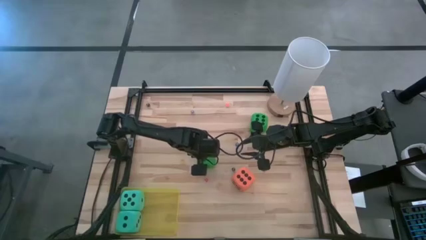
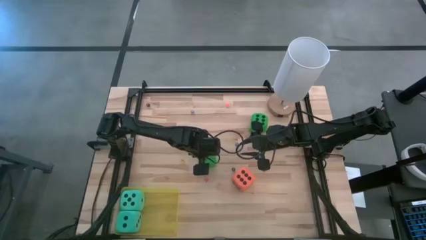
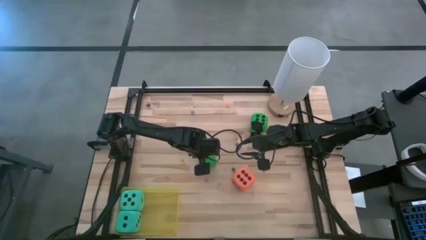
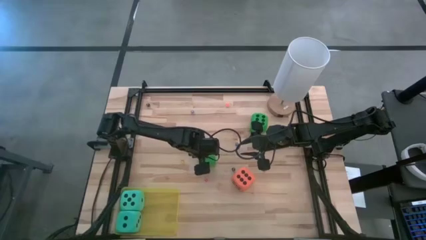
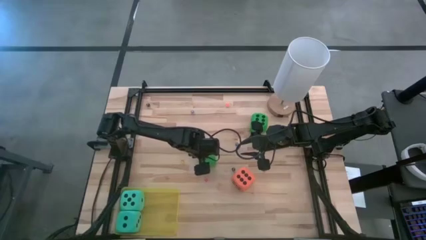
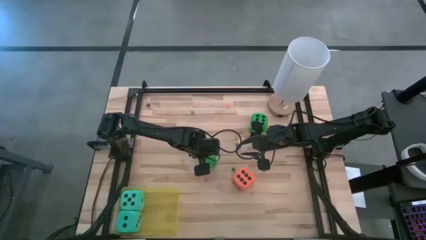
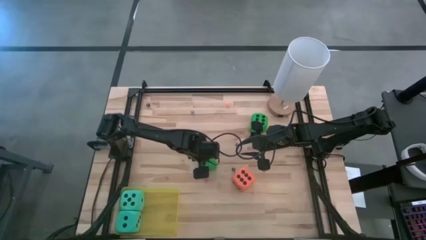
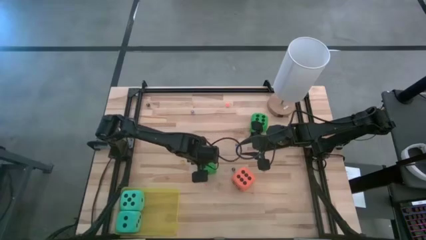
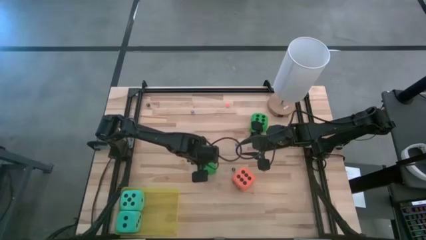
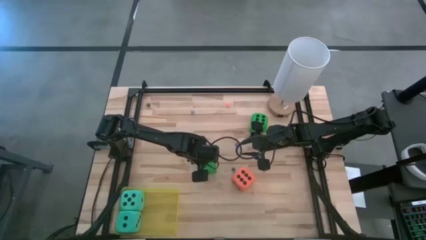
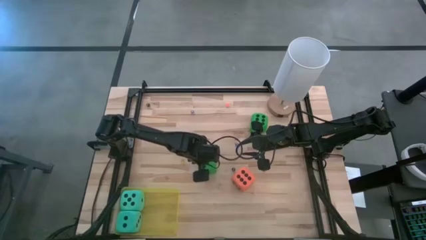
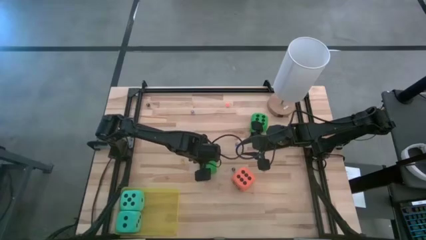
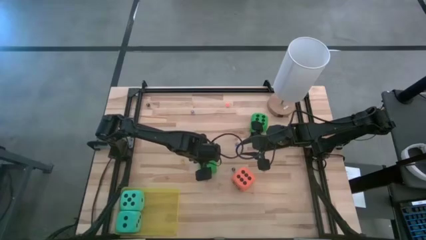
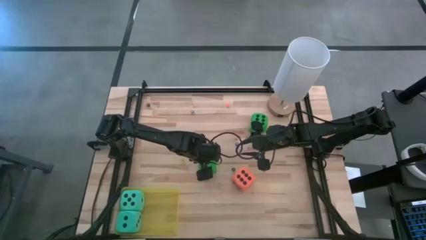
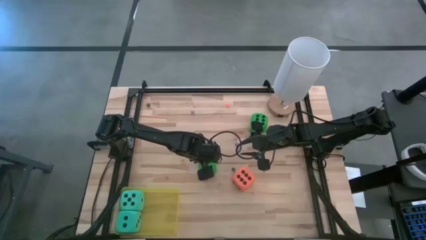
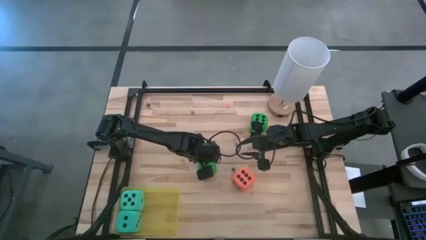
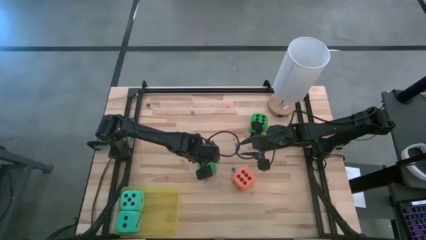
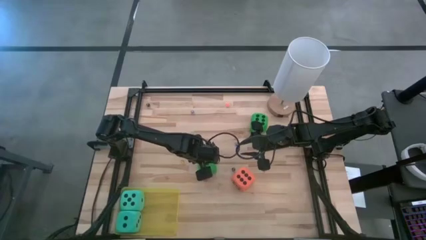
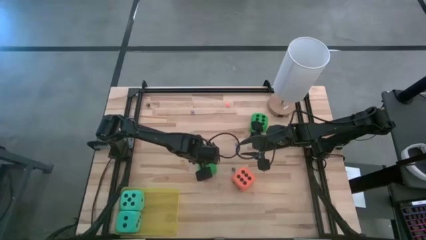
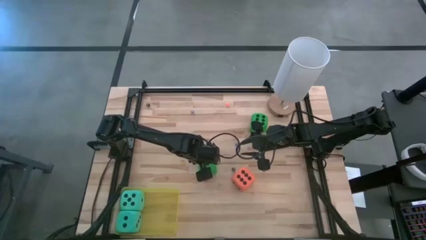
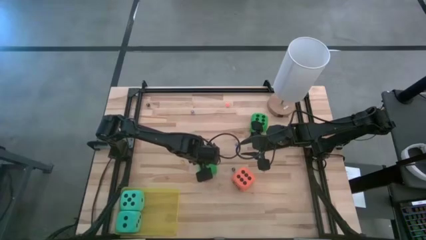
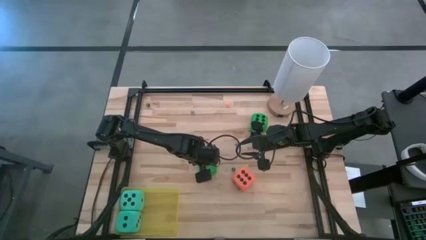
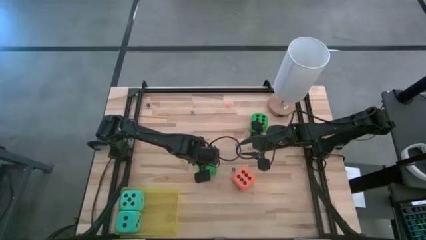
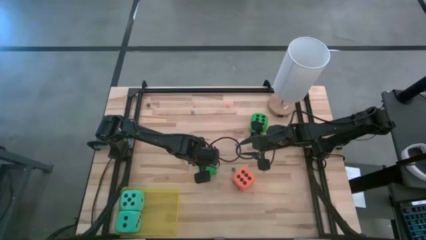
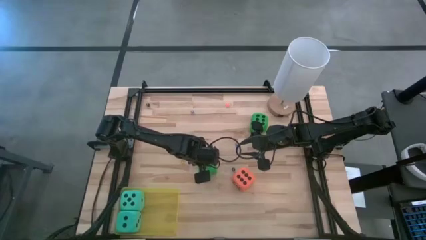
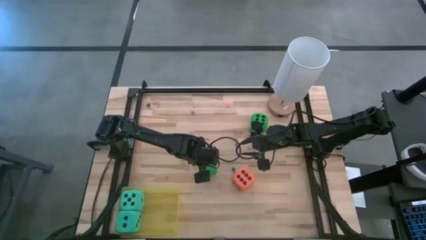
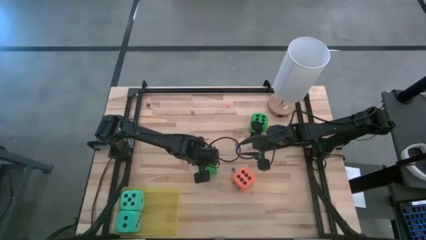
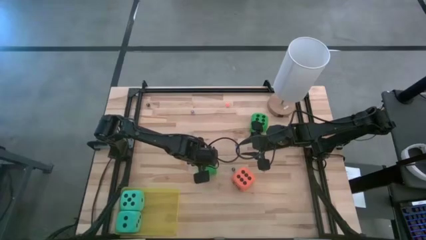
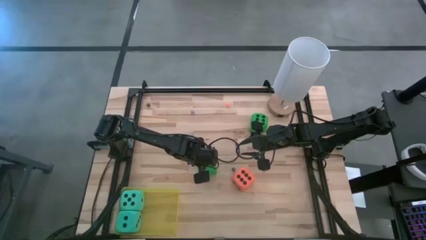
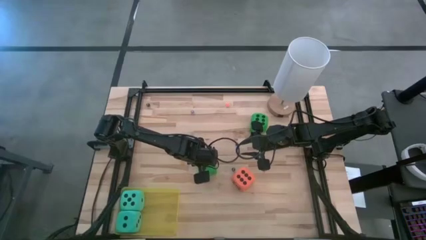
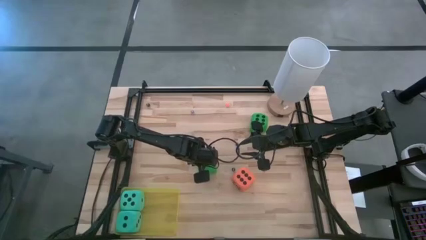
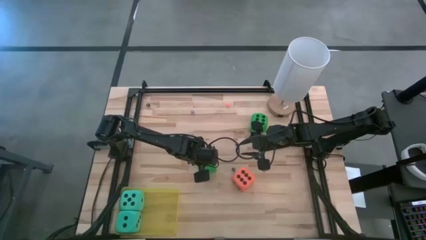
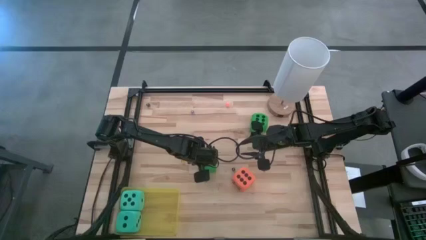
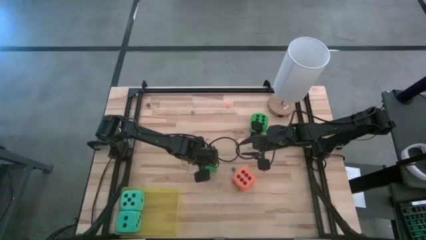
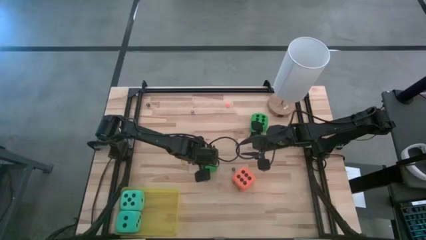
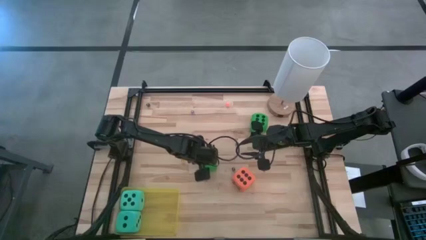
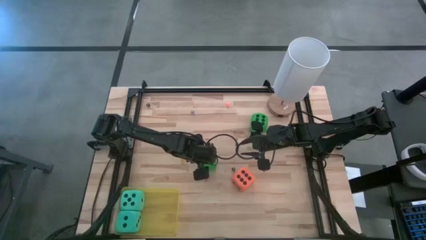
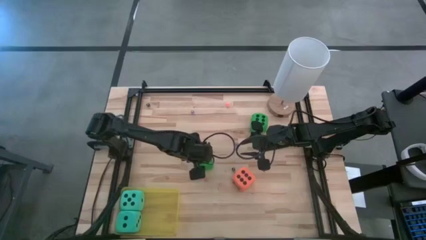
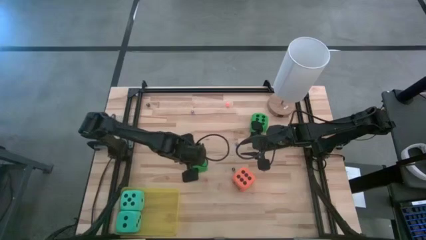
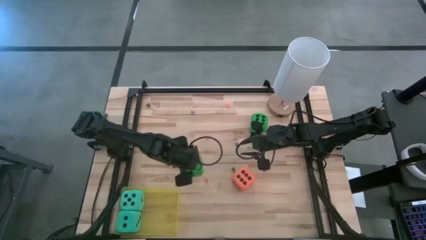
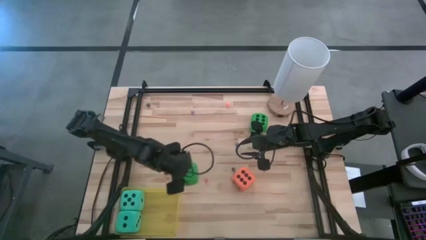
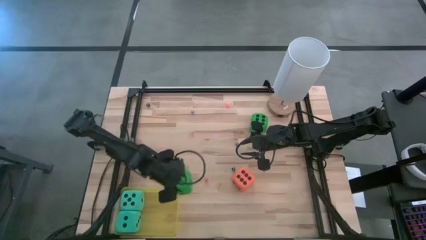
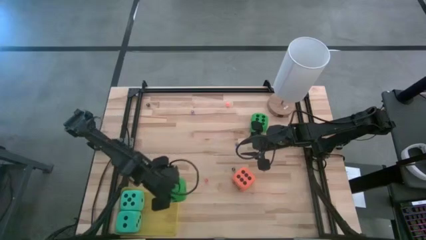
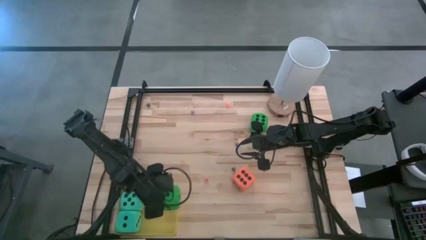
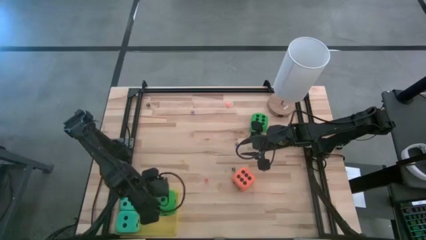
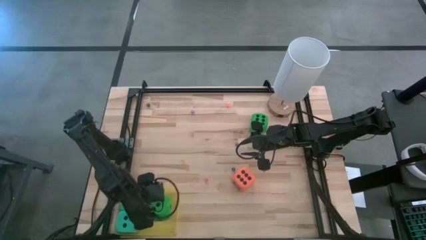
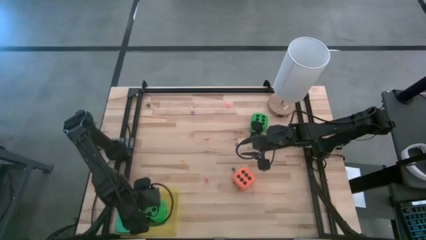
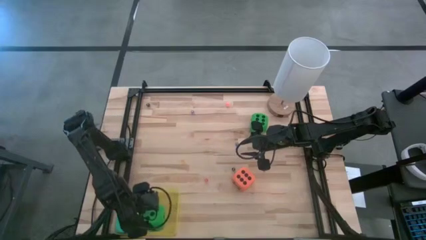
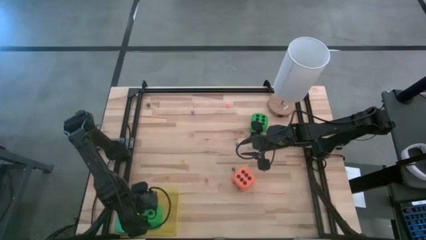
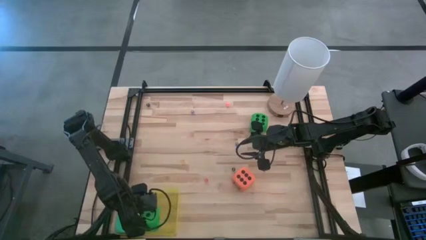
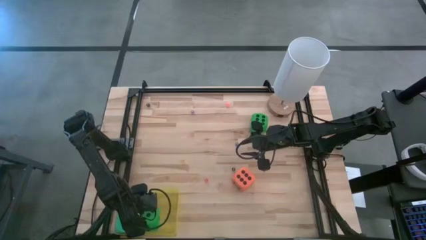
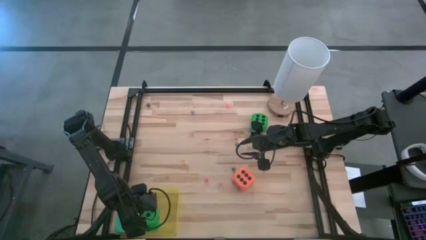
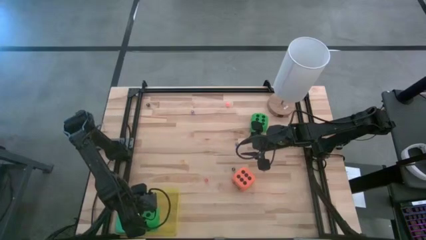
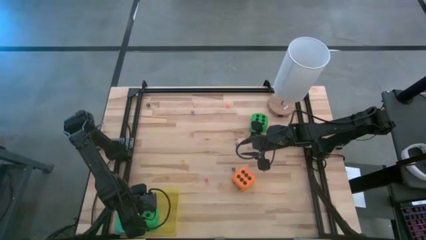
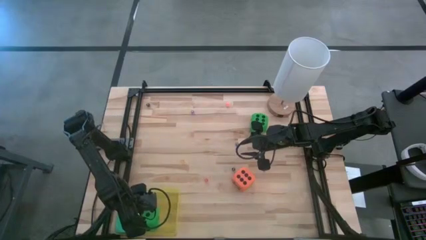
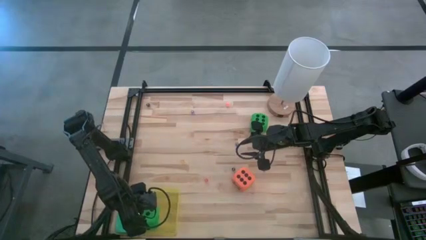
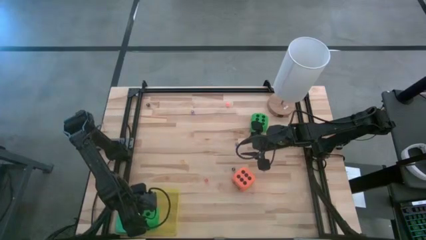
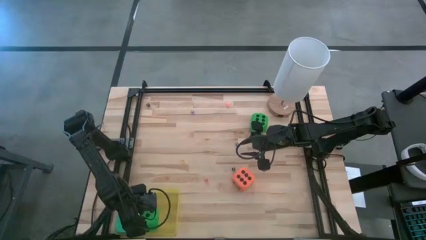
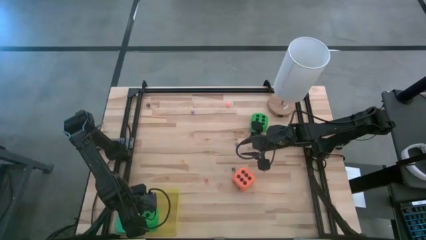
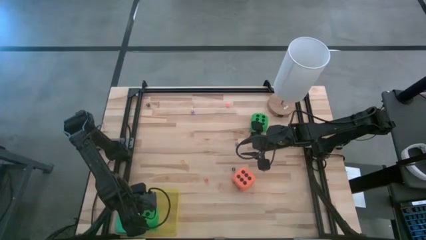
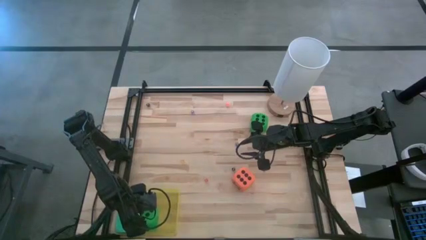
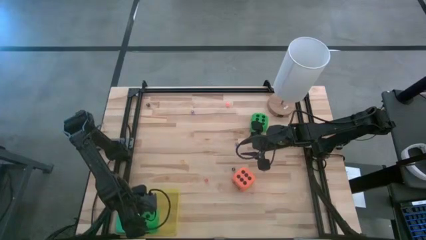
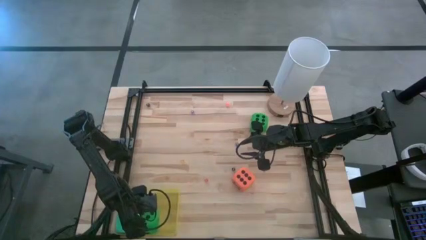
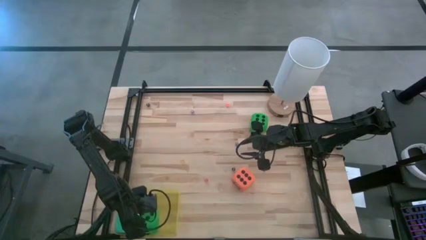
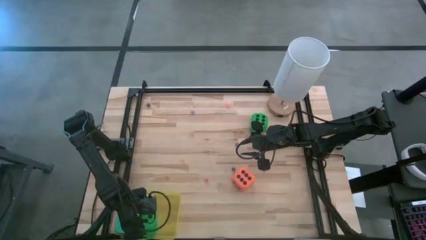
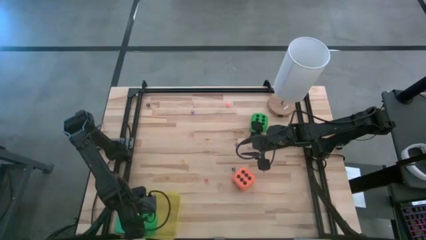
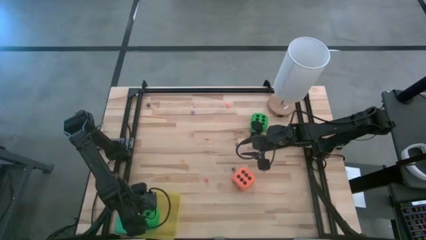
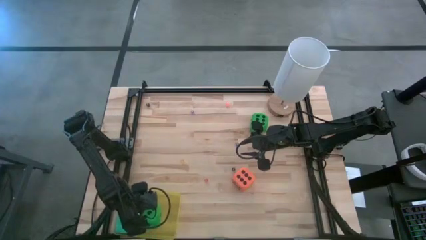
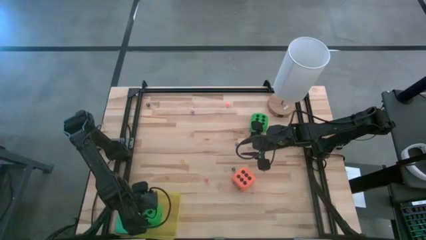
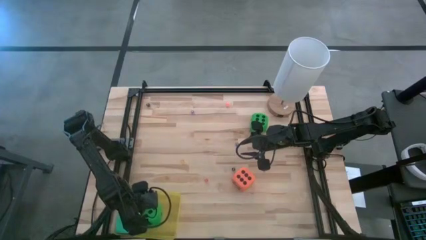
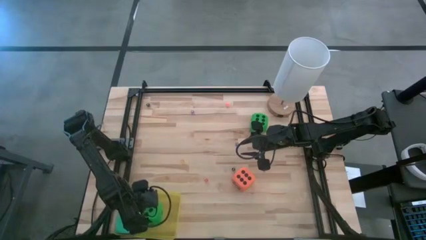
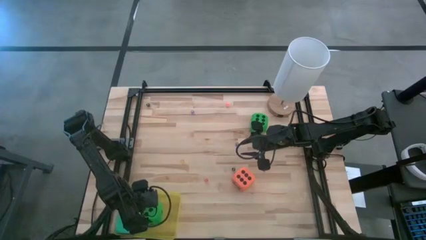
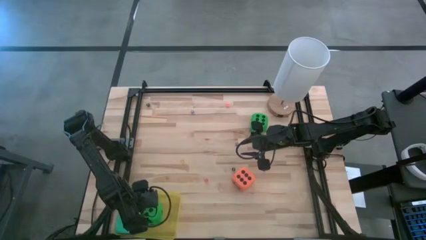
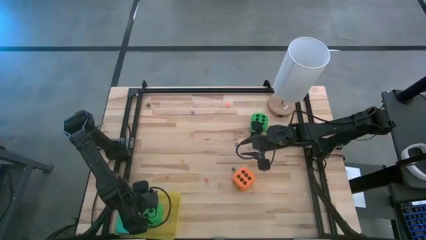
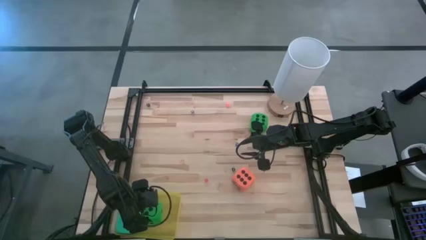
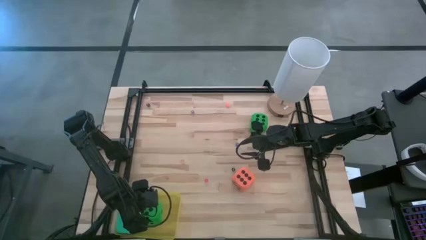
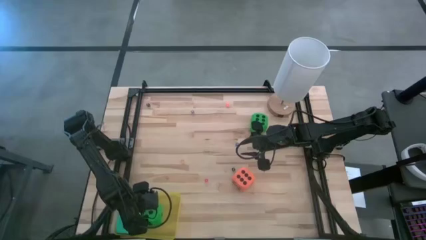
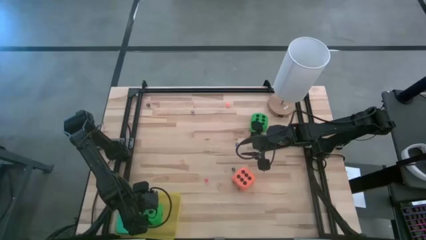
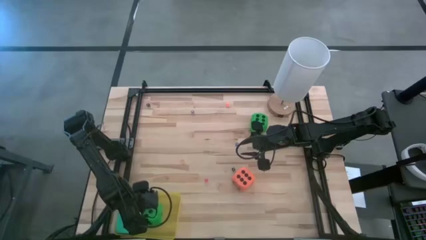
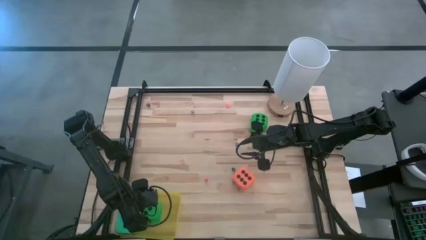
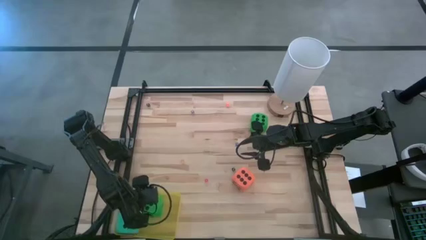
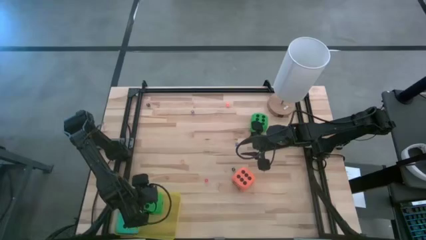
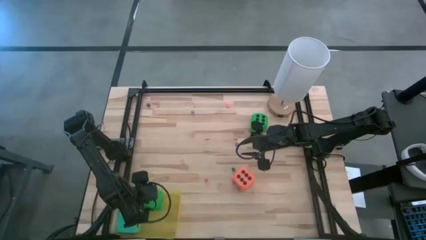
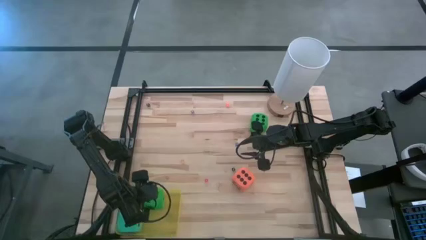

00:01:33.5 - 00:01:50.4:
Task: Pick & Place Dice
Put the bottom large green dice into the yellow bin
